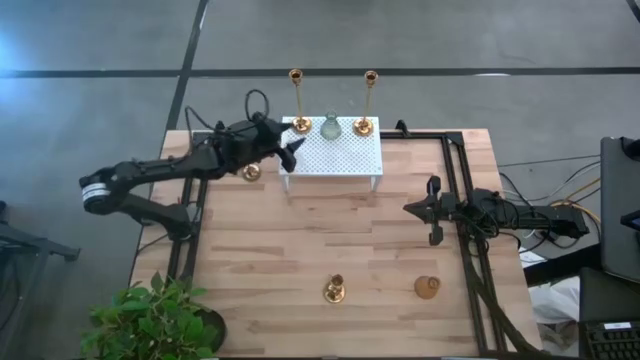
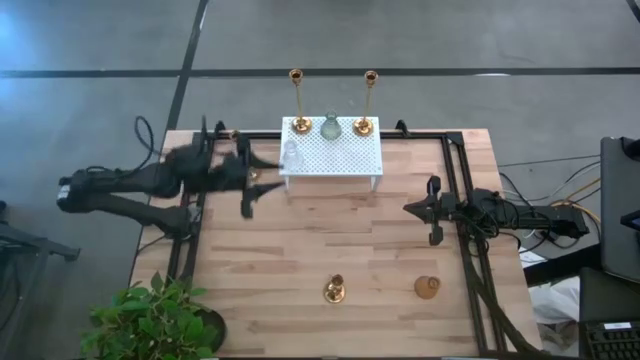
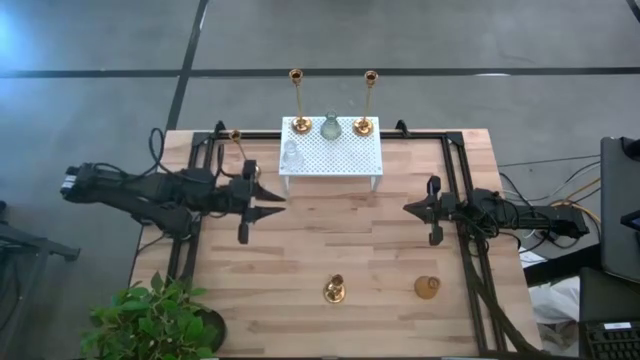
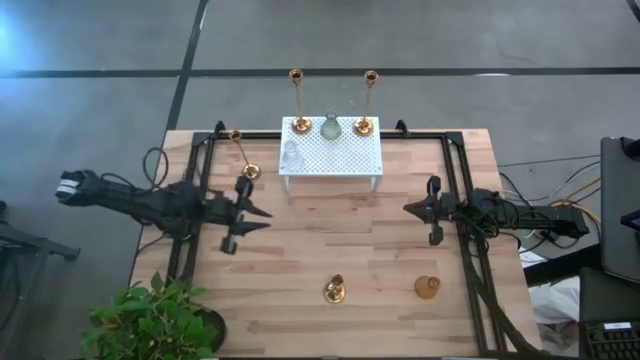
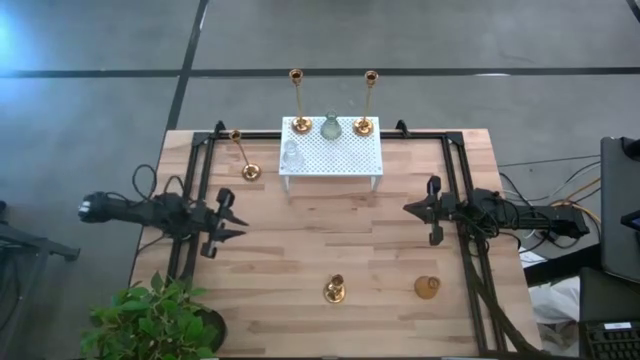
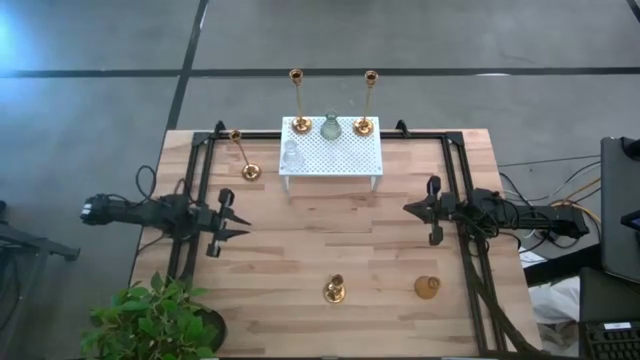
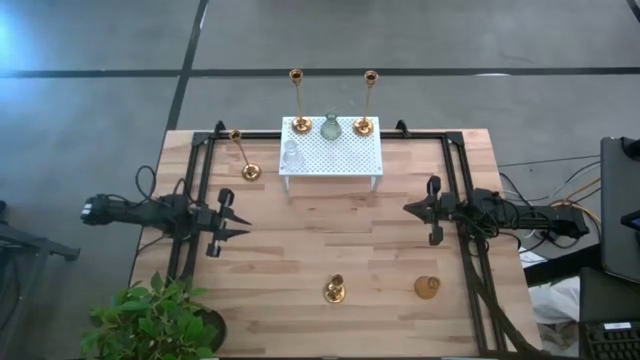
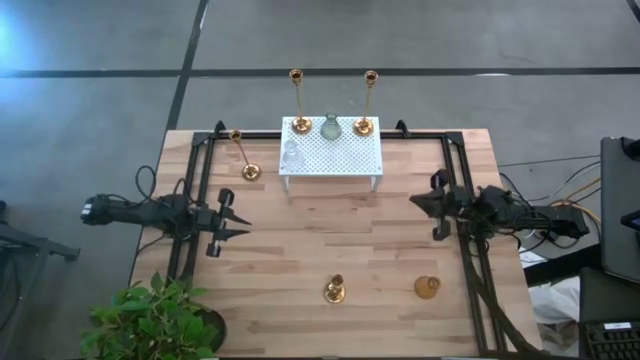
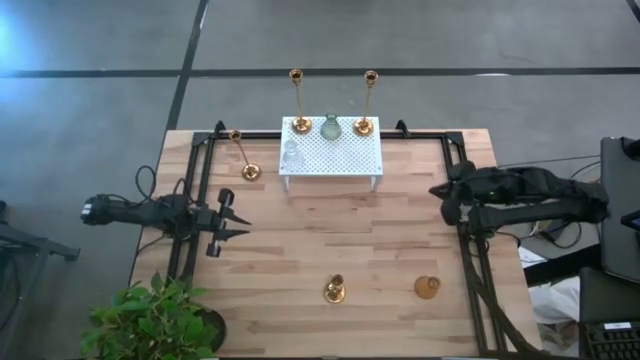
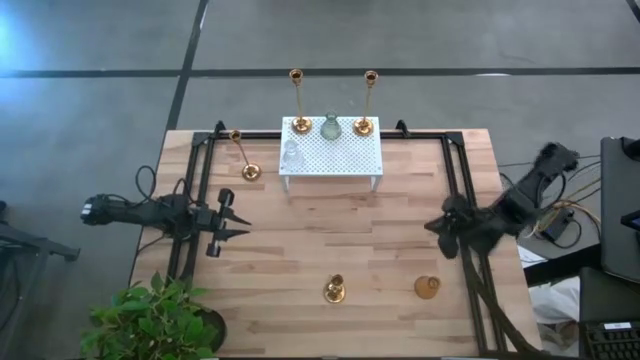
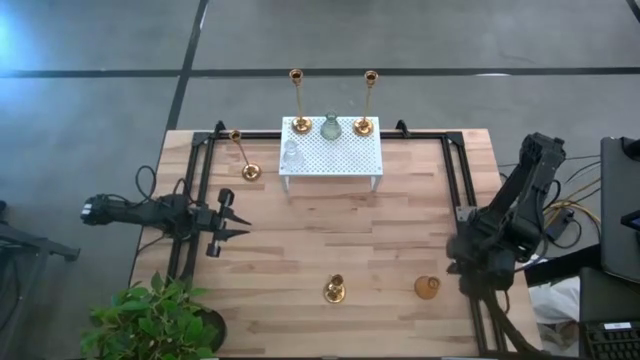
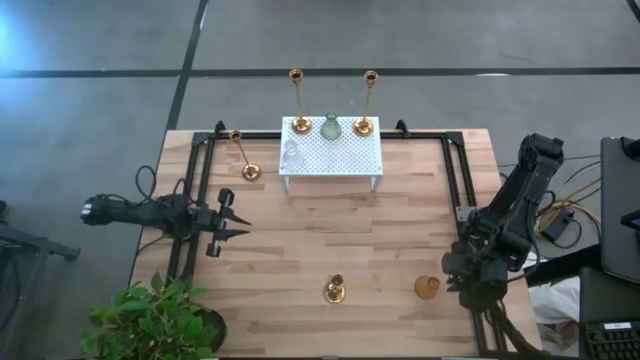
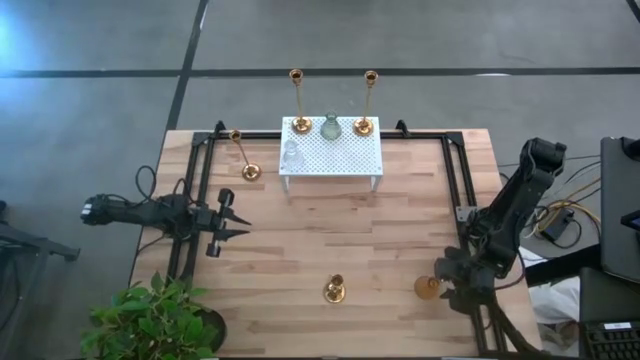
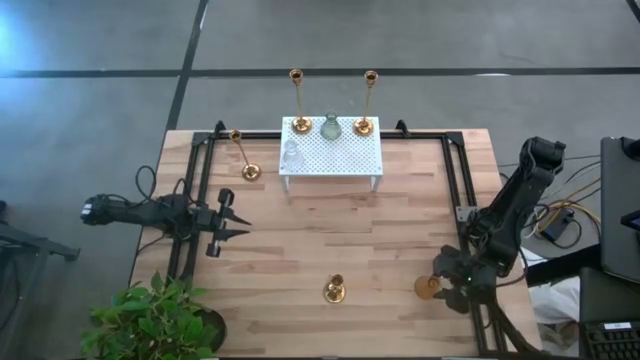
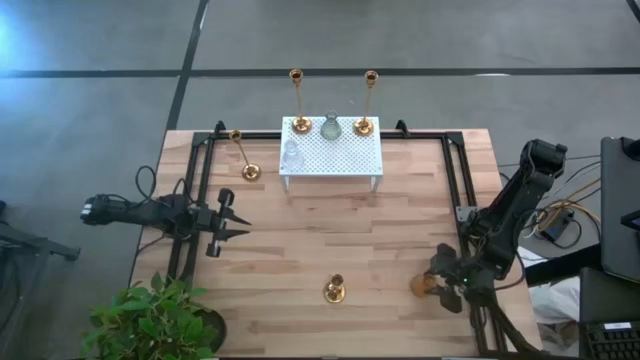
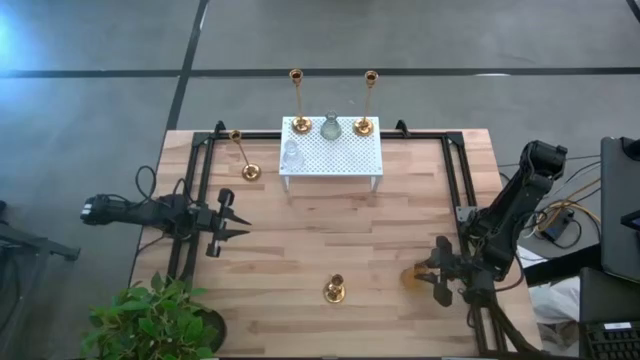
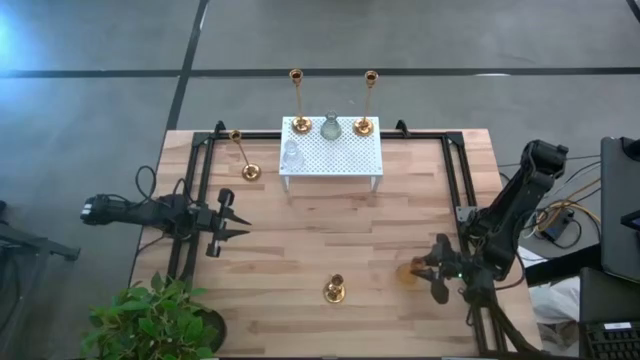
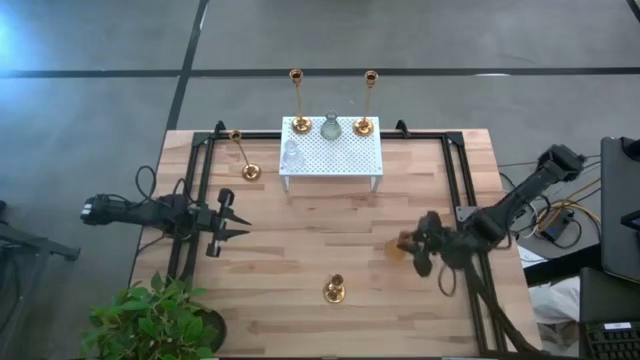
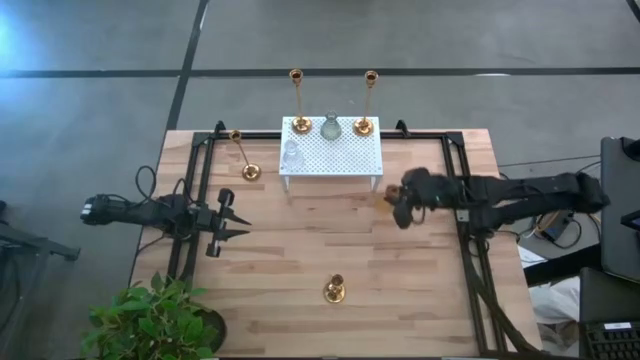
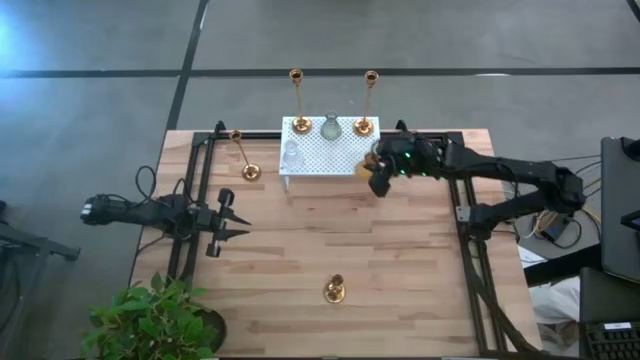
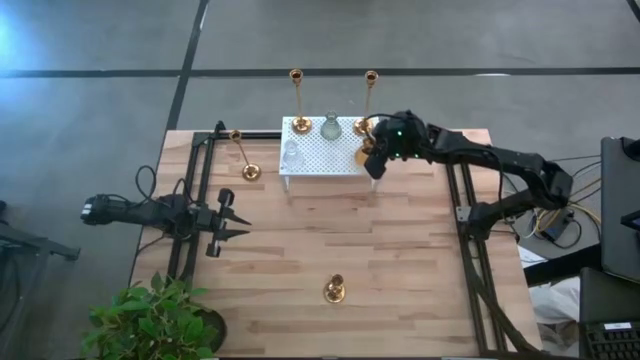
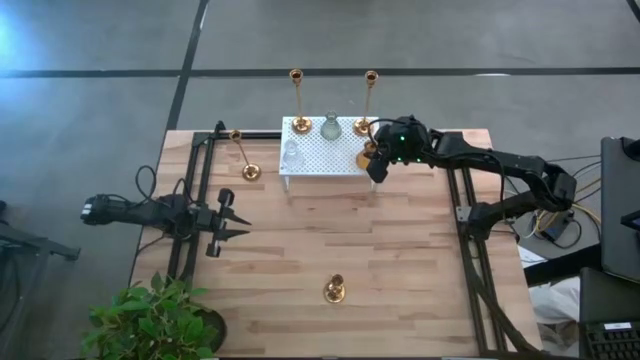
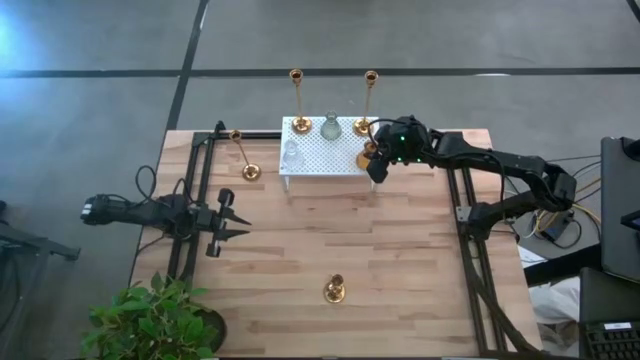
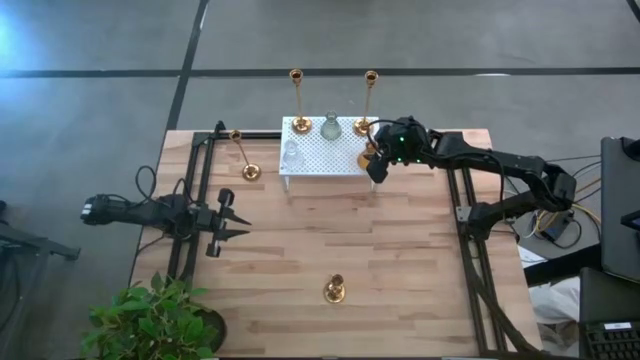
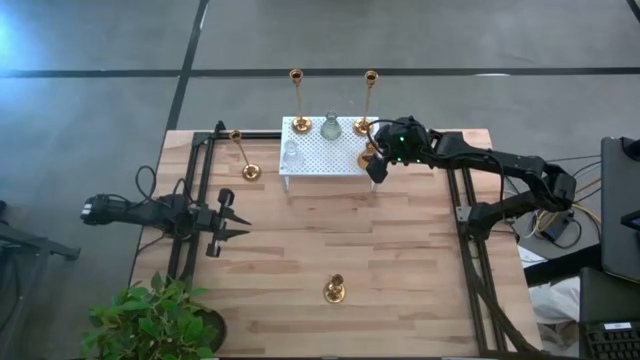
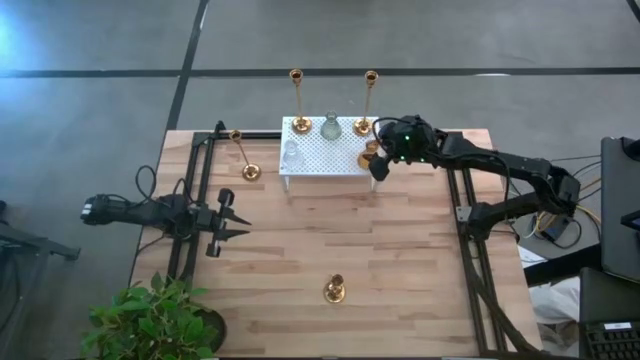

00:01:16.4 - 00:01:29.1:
Task: Pick & Place candle stick holders
Put the orange glass candle holder on the shelf

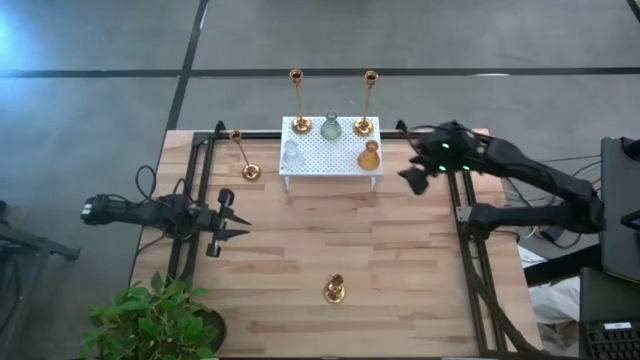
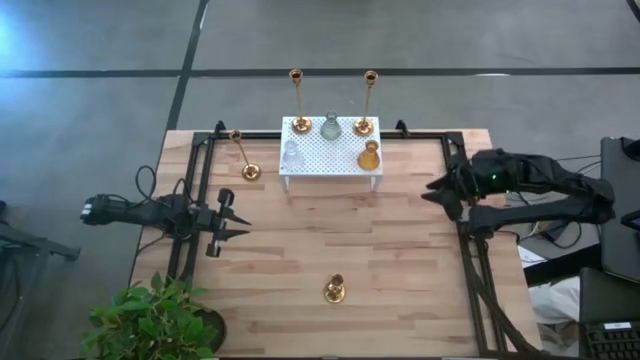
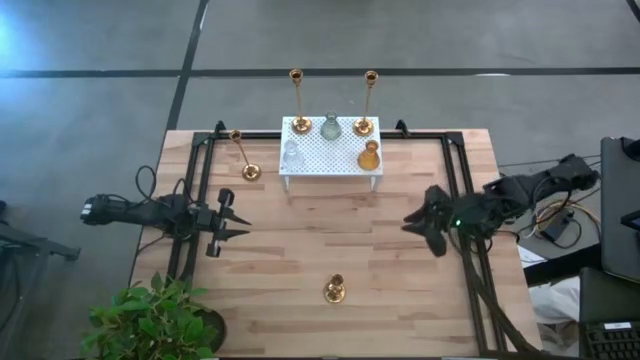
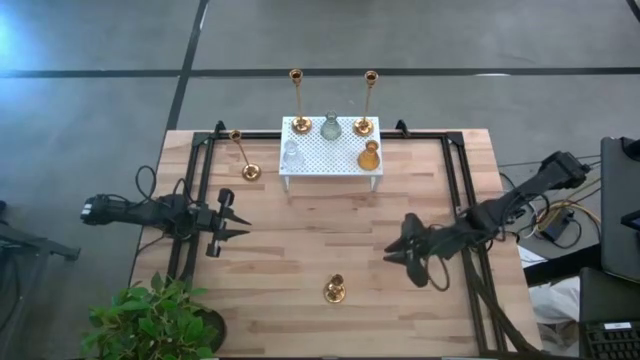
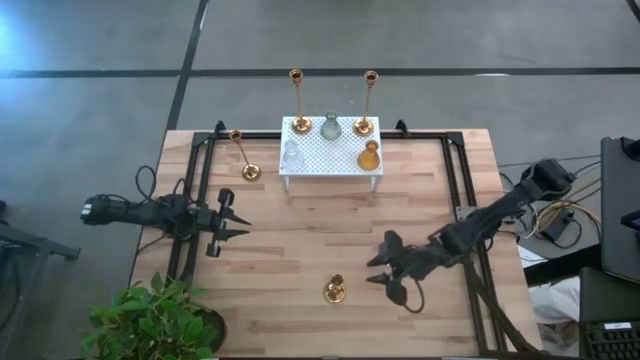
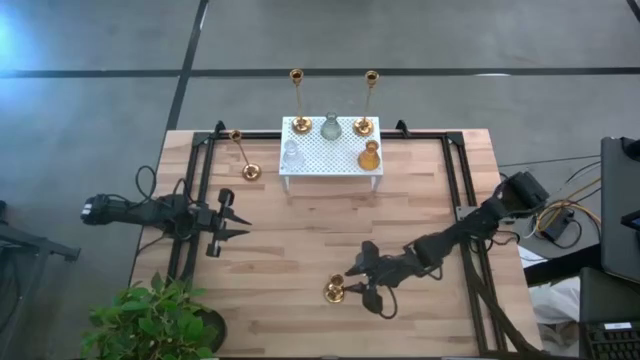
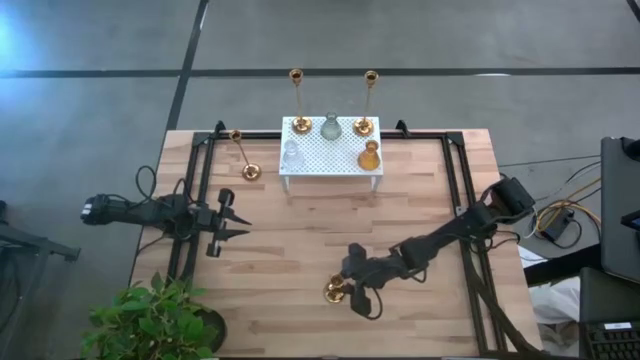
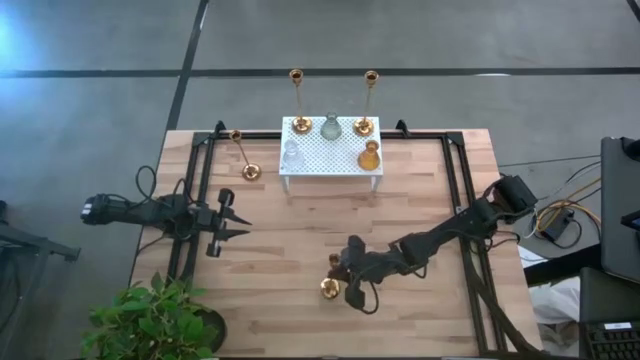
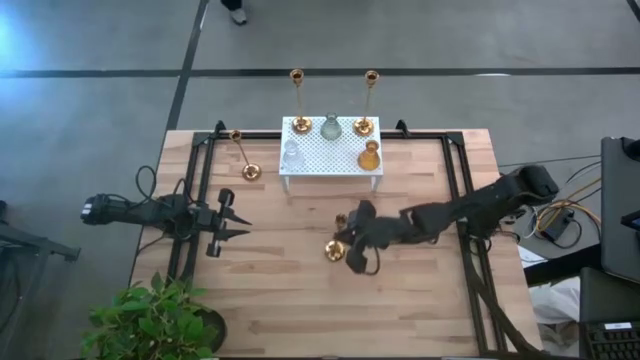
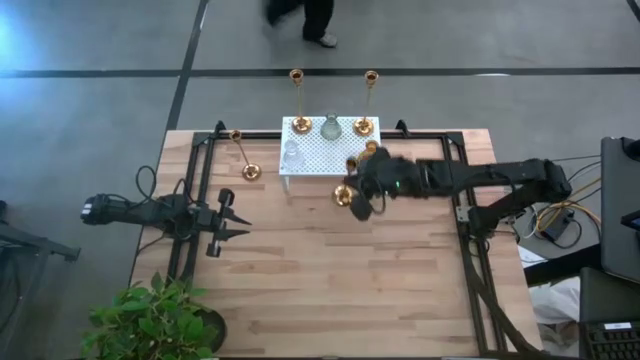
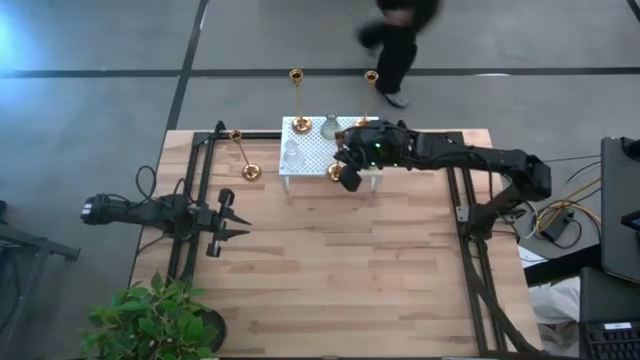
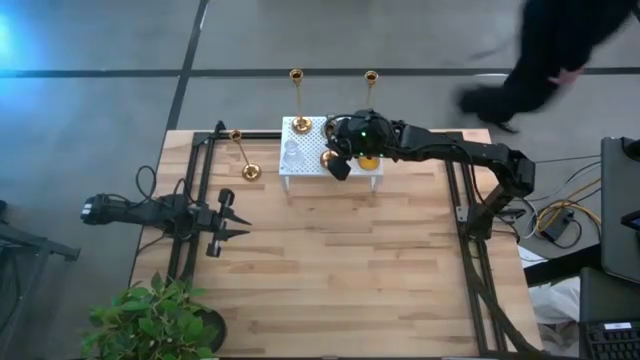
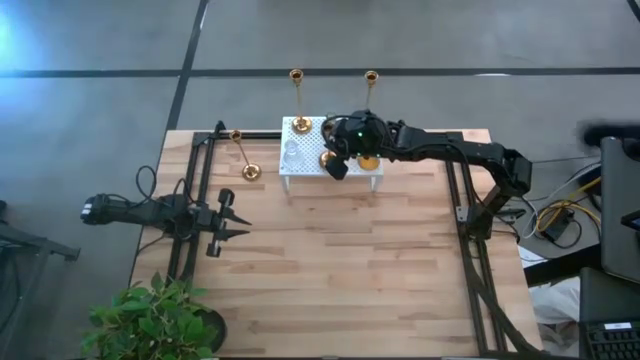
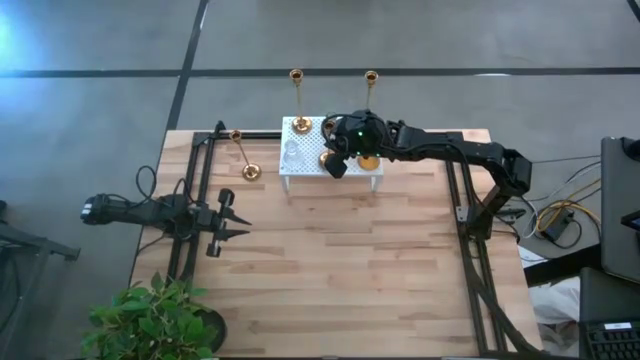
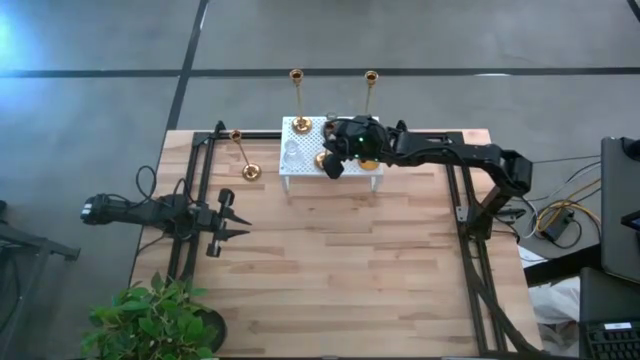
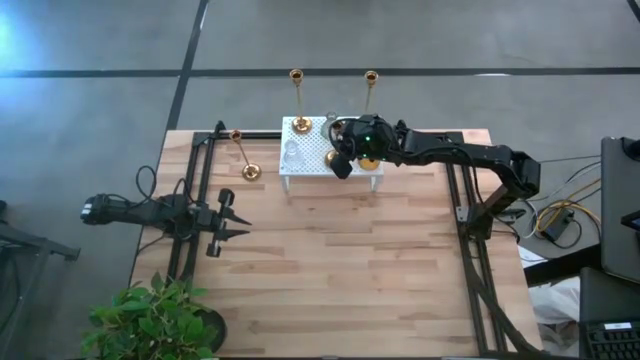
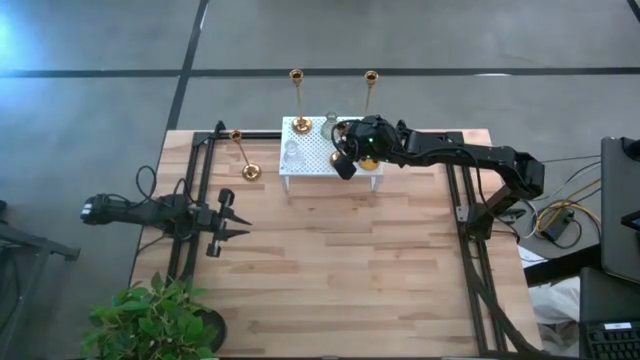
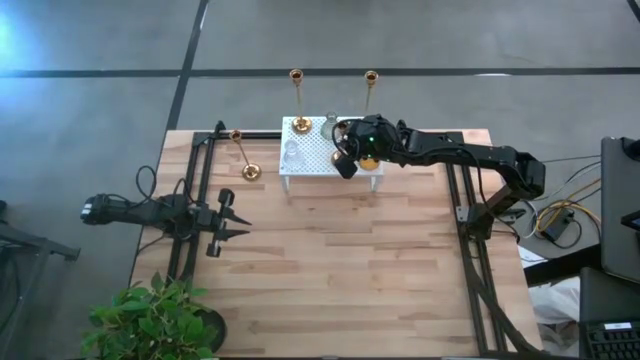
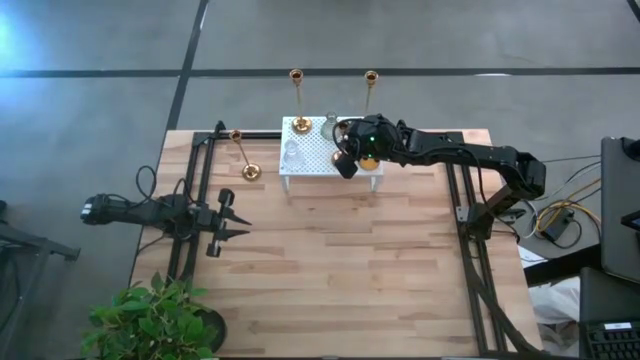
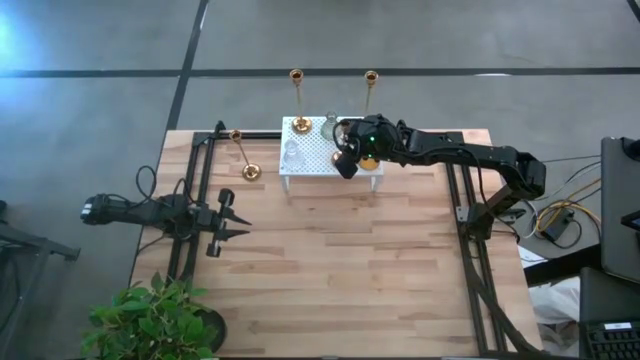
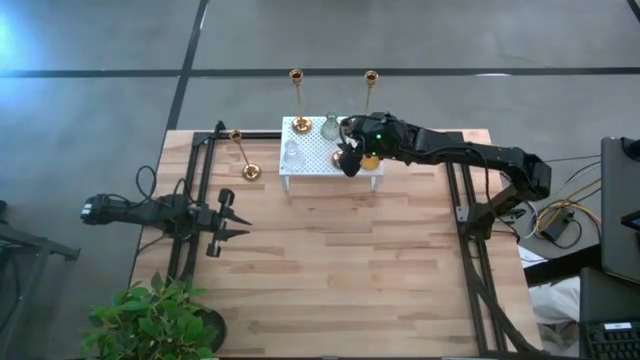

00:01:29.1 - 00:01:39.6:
Put the gold candle holder on the shelf
